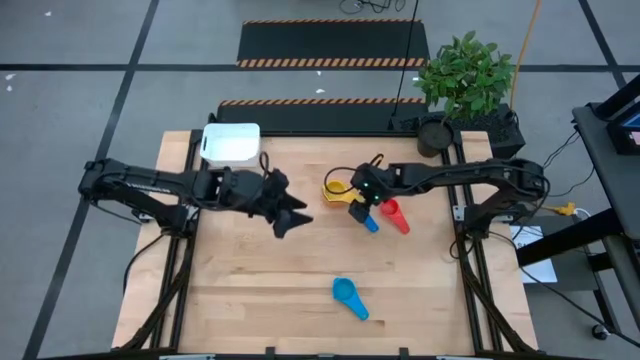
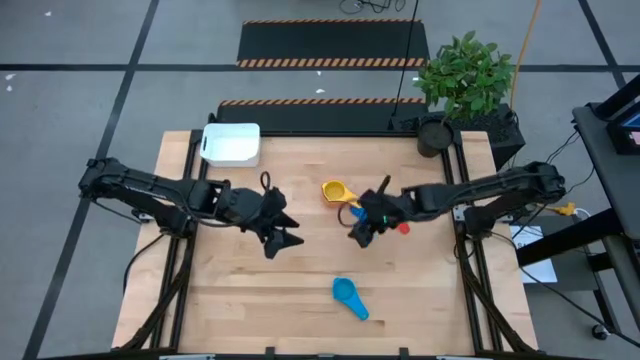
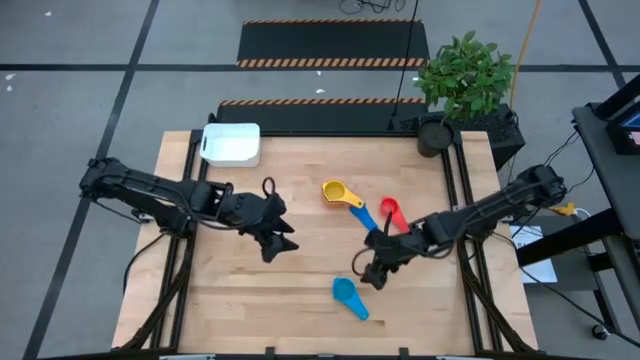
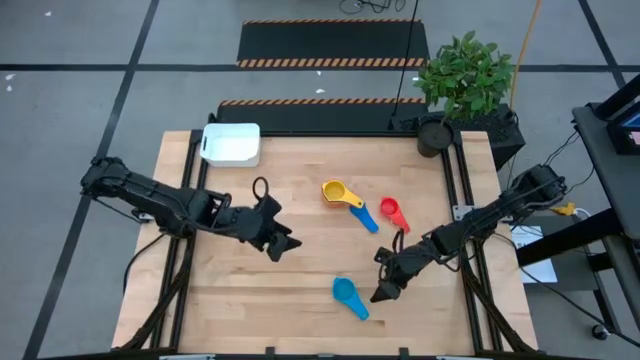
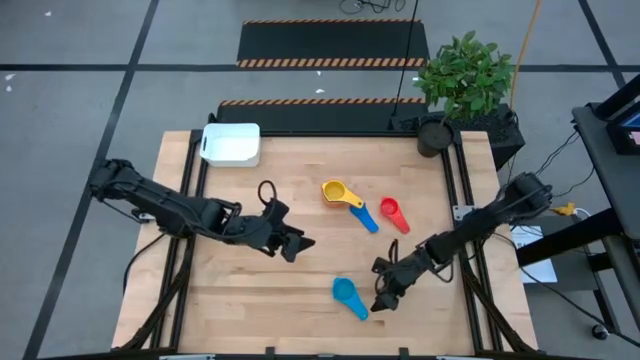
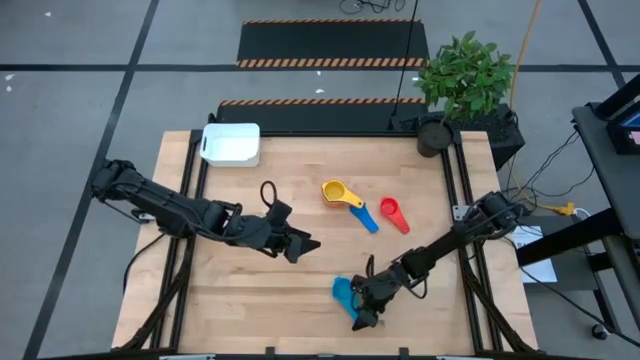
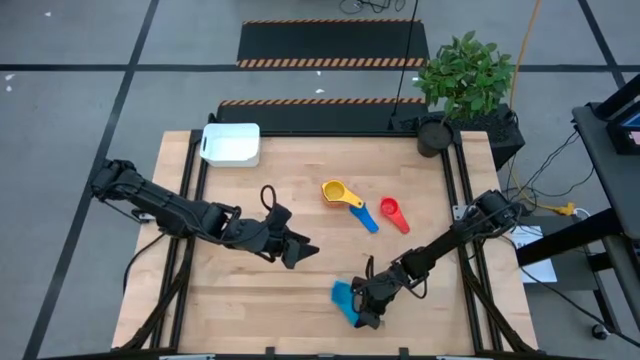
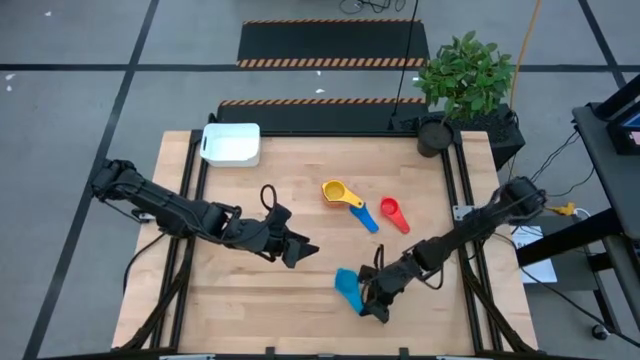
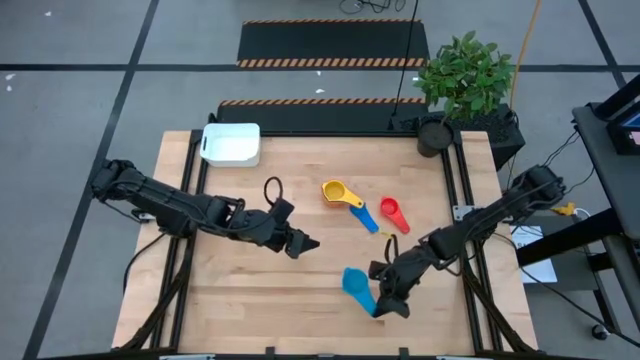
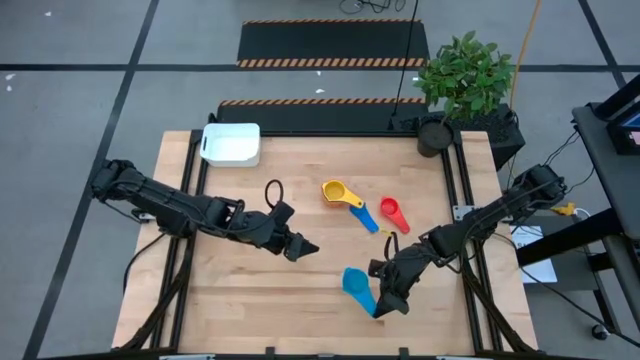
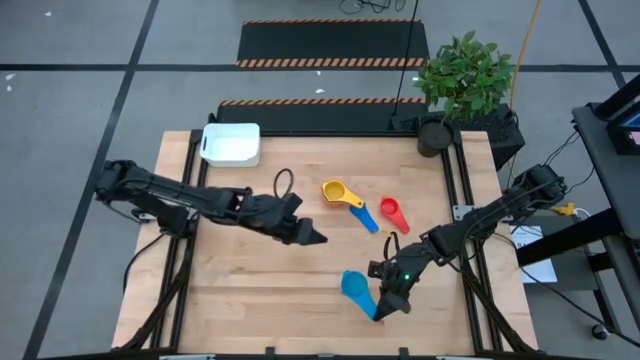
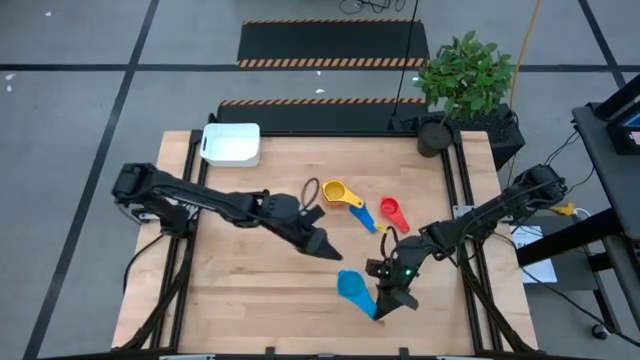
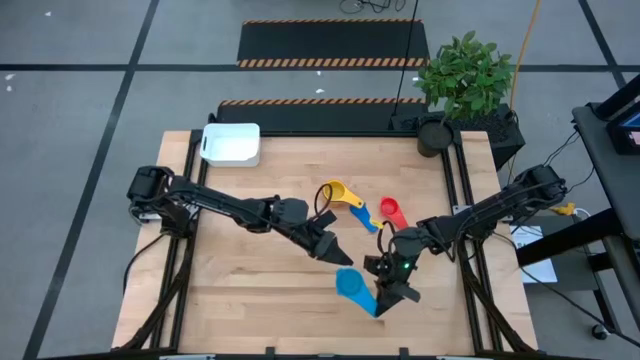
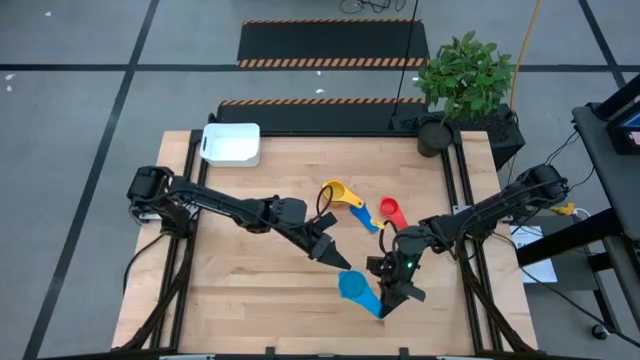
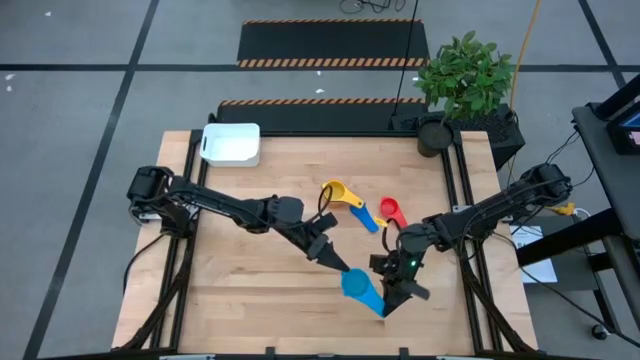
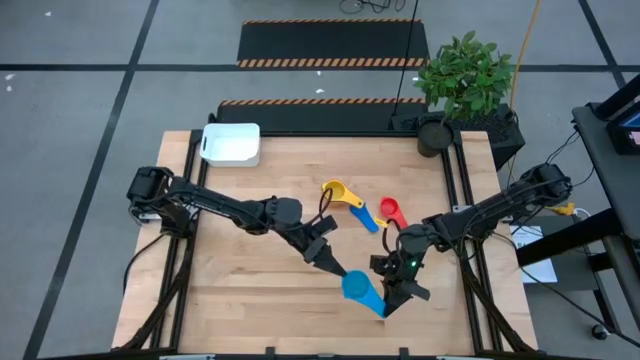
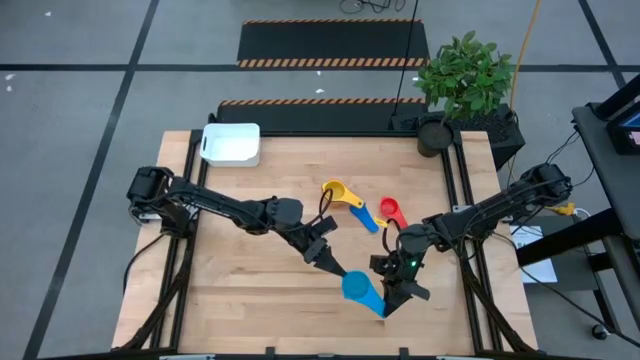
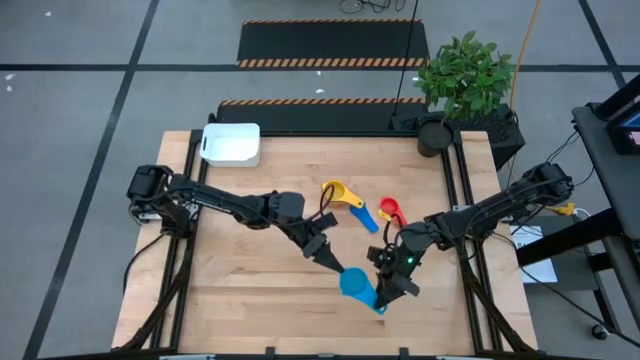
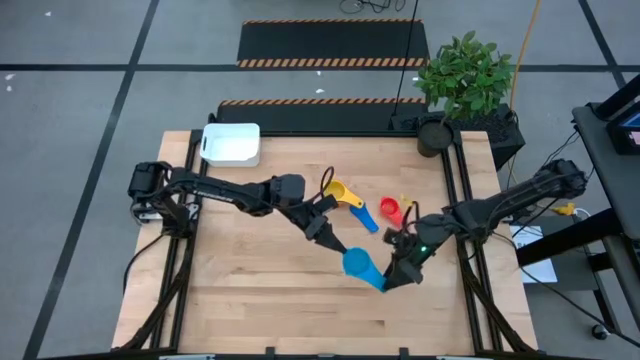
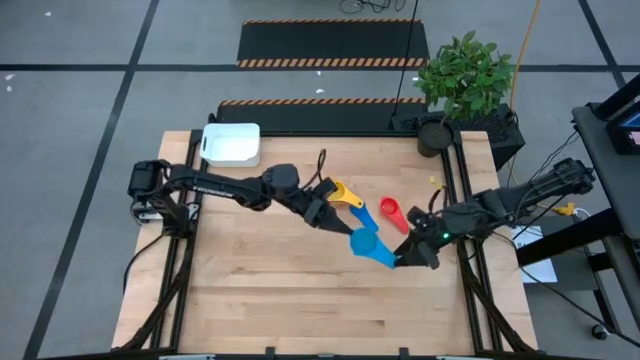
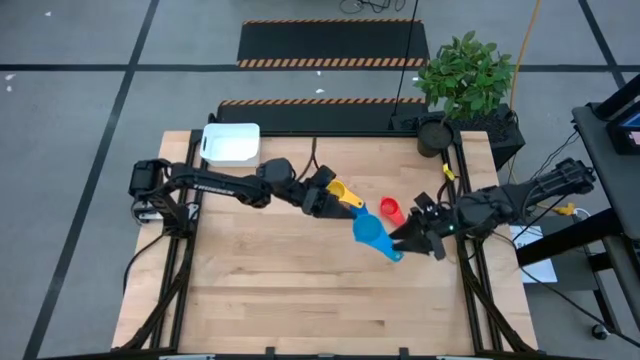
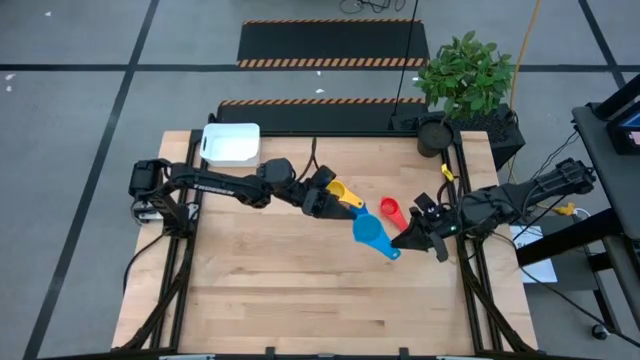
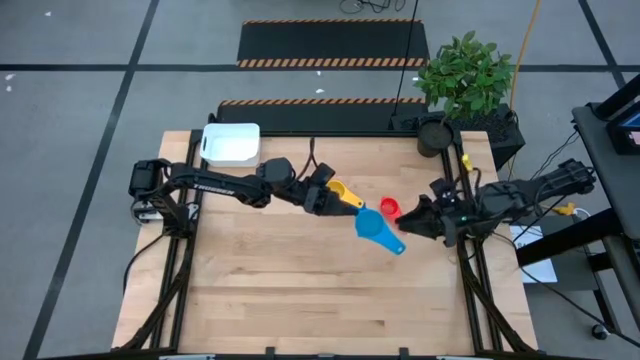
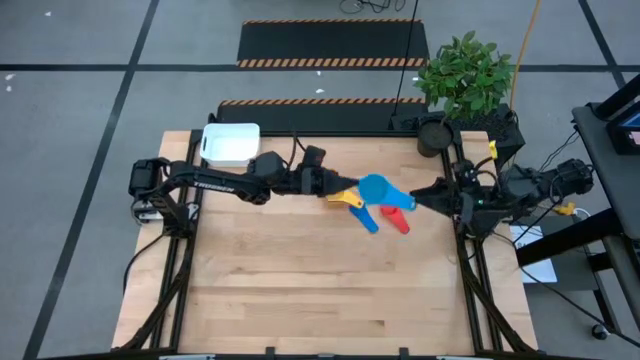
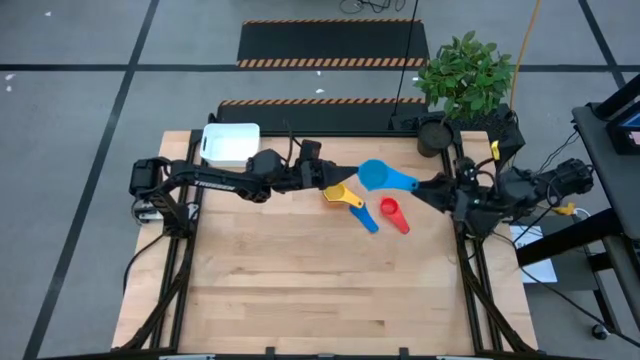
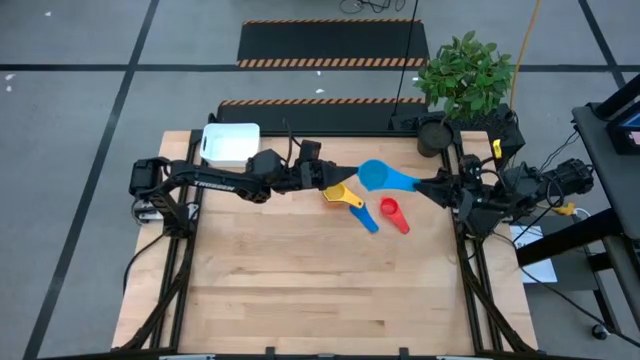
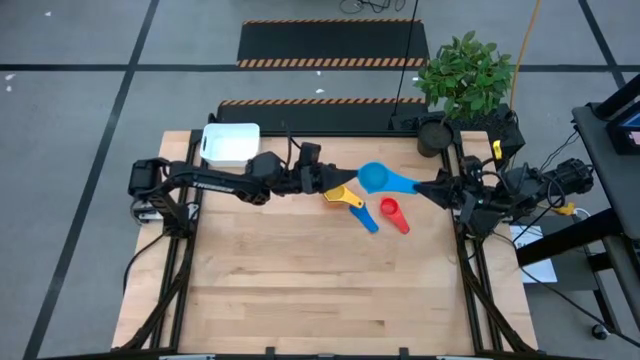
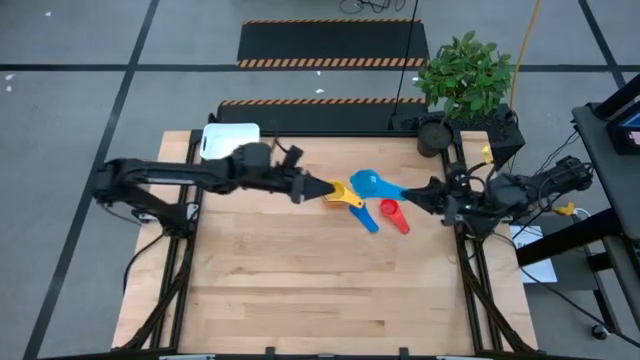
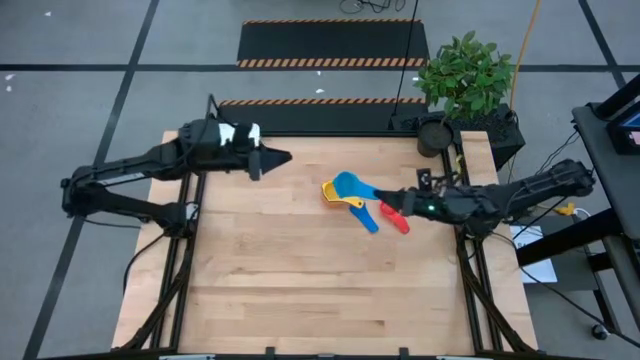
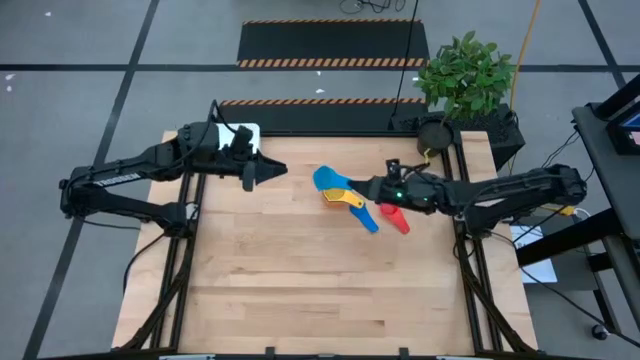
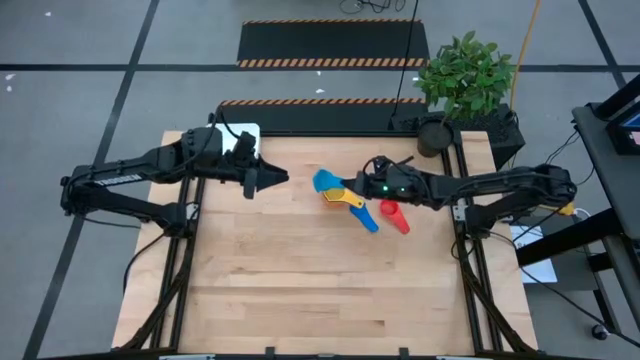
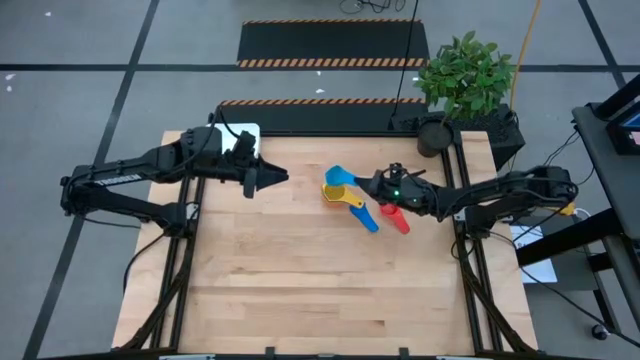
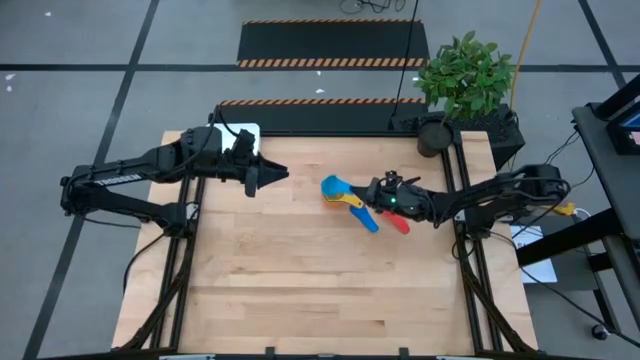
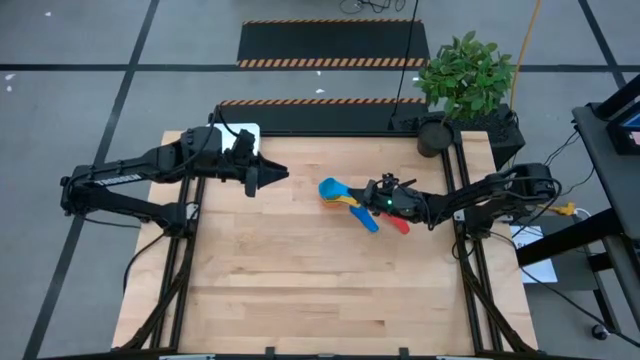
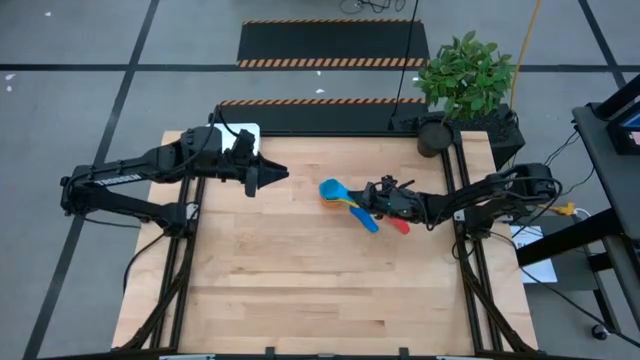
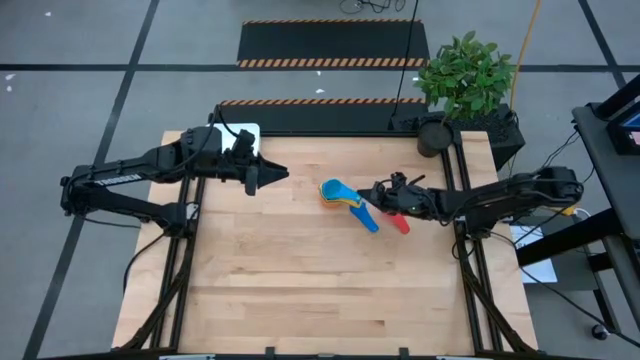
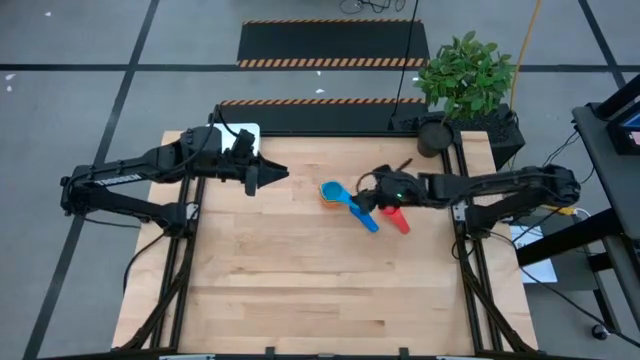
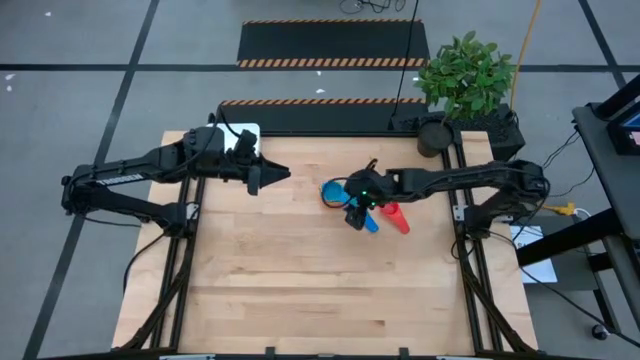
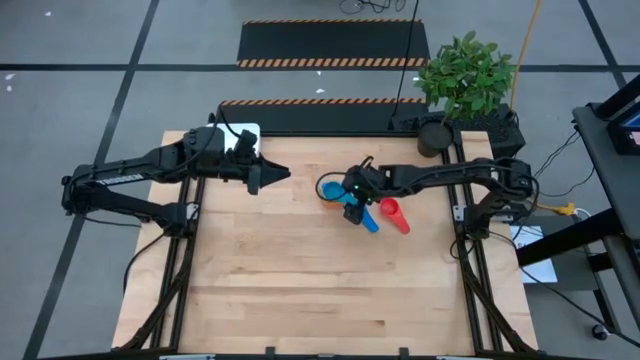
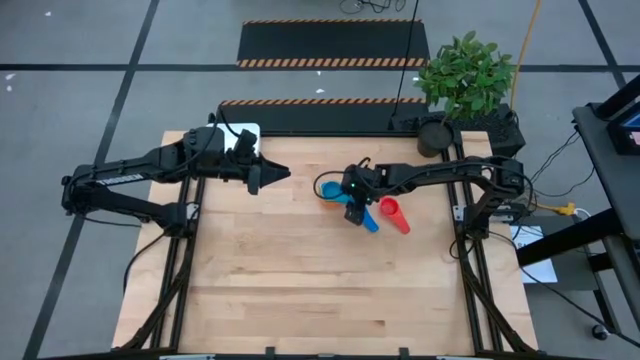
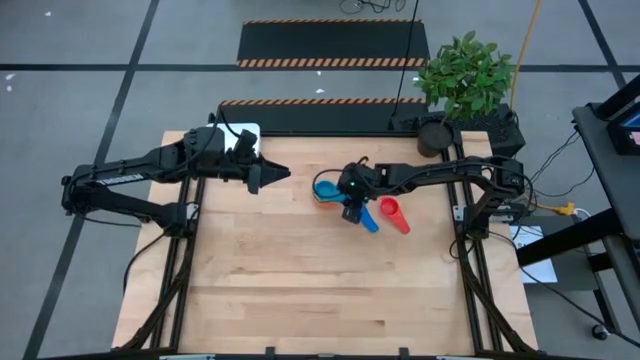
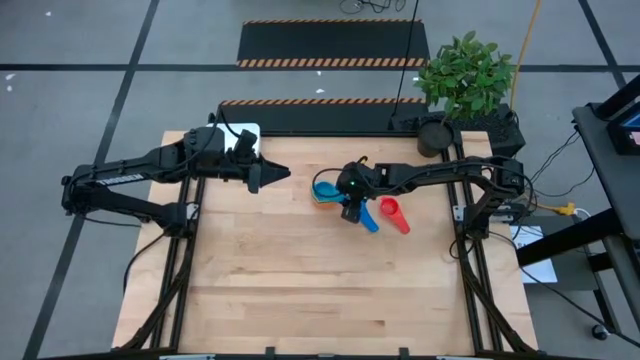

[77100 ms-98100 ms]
Task: Nest measuring cups in basket
Stack the light blue measuring cup into the yellow measuring cup
